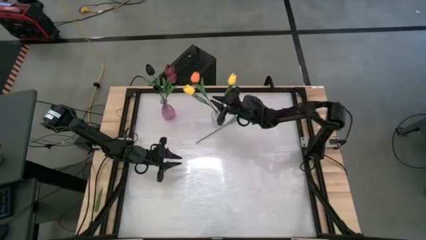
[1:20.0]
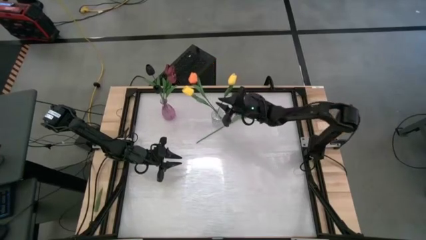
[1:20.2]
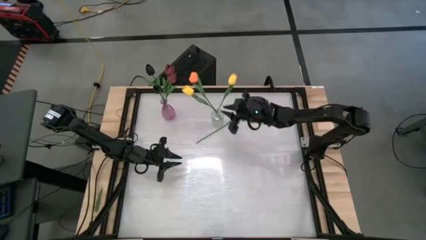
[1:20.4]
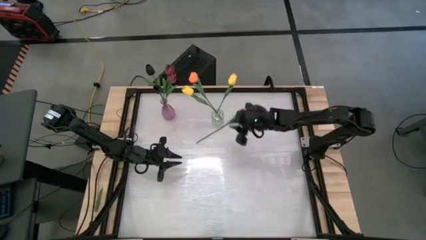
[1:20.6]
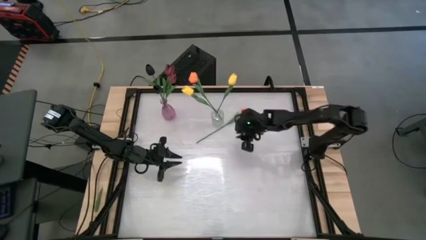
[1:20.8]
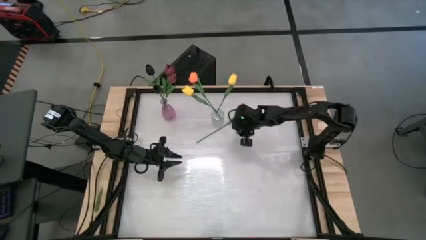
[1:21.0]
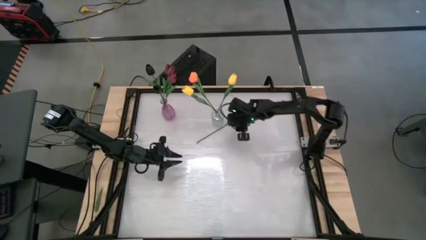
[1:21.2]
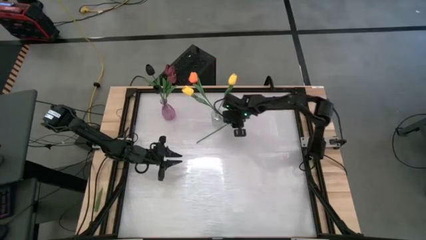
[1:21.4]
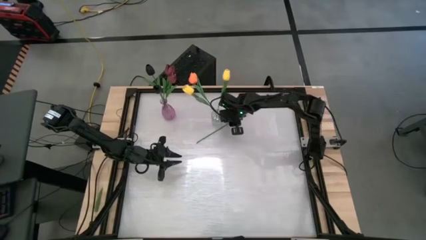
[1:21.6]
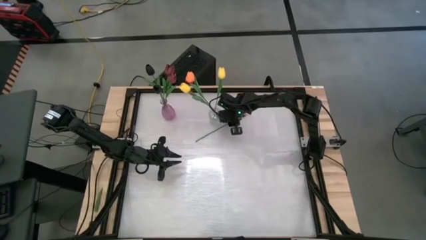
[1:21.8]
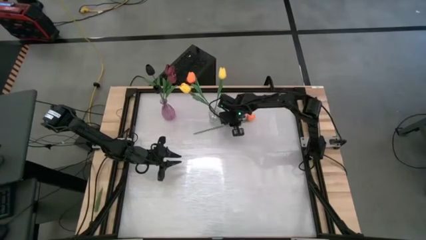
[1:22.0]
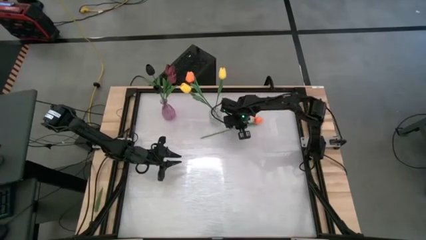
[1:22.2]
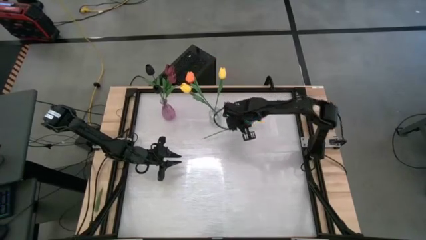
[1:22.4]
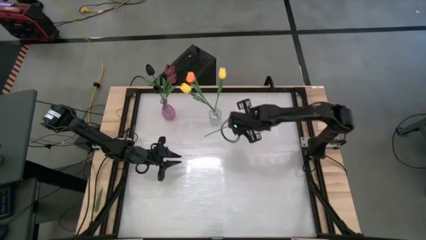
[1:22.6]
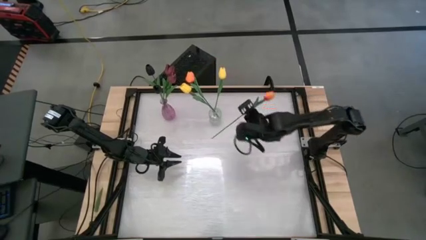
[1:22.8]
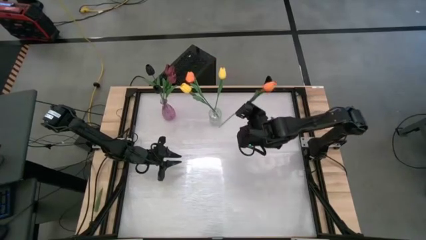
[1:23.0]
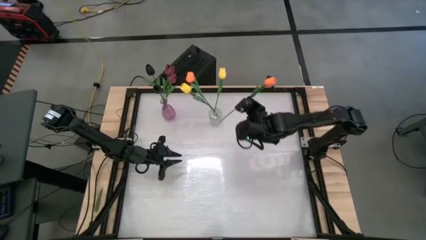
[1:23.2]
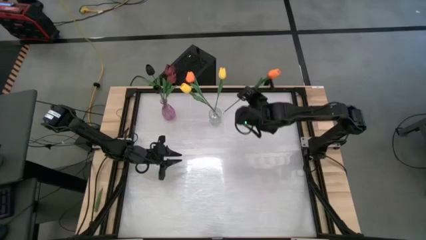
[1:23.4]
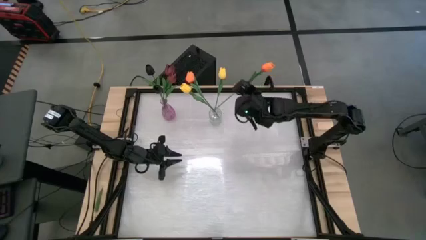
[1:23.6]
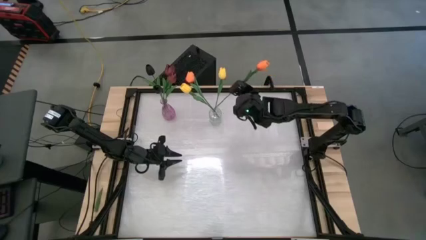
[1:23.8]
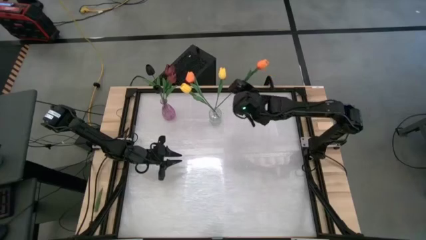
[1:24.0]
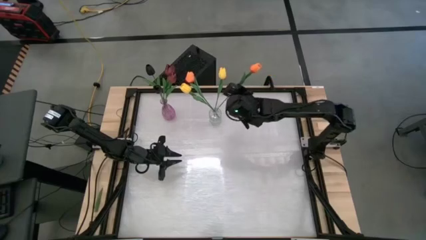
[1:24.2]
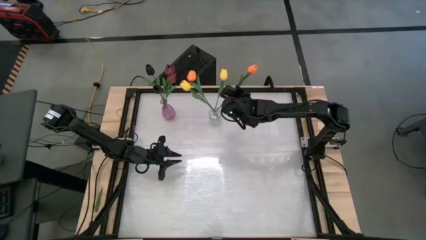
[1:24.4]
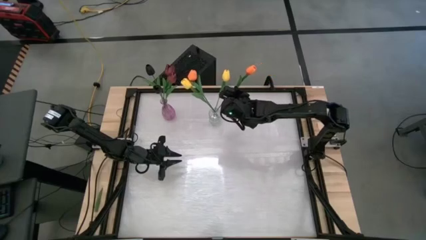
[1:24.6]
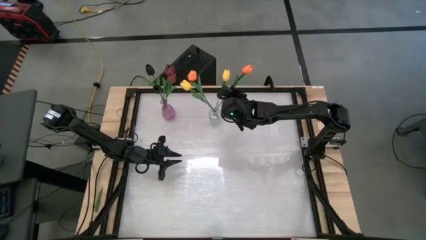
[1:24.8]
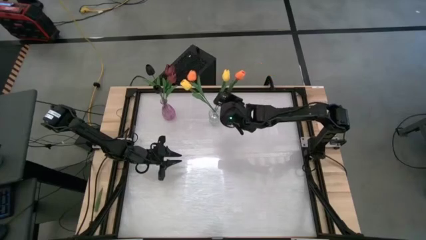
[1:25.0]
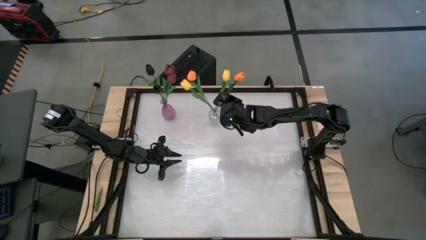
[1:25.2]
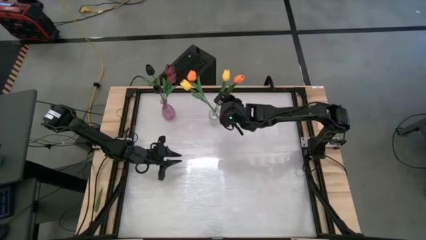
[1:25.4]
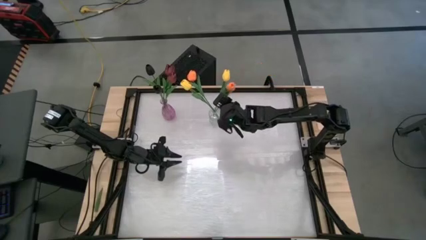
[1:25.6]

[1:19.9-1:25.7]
Task: Sort flowers into vase by color
Put the orange flower into the transparent vase

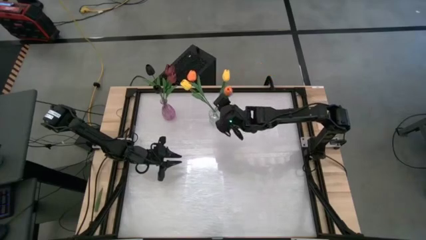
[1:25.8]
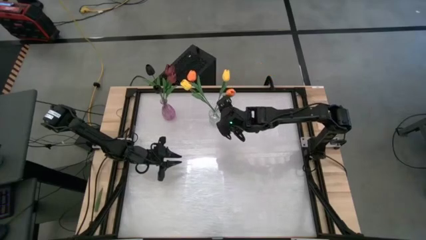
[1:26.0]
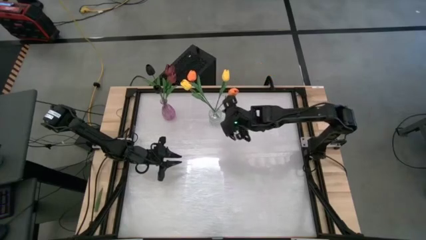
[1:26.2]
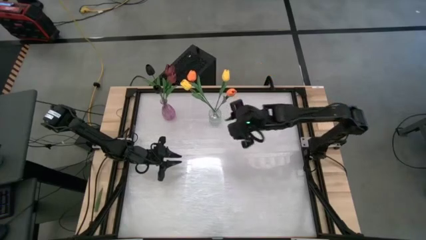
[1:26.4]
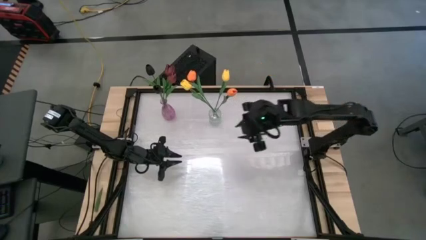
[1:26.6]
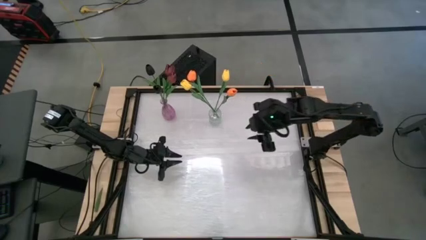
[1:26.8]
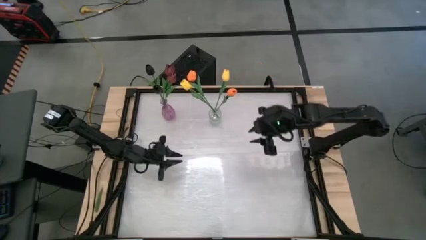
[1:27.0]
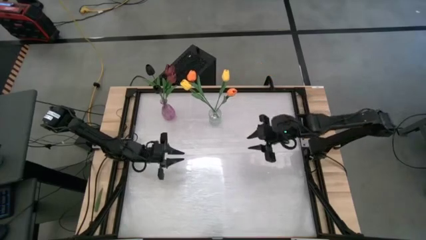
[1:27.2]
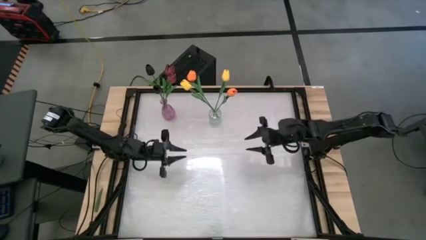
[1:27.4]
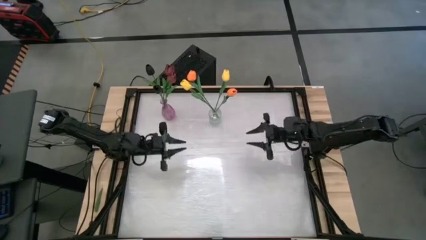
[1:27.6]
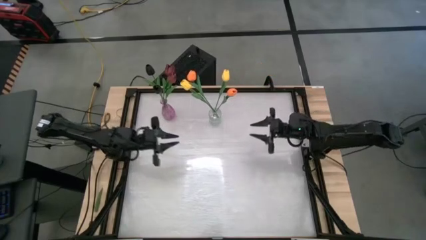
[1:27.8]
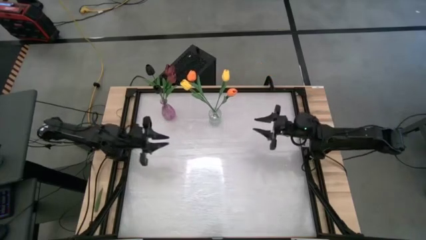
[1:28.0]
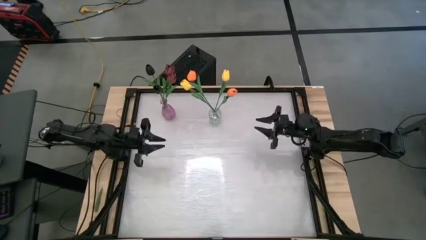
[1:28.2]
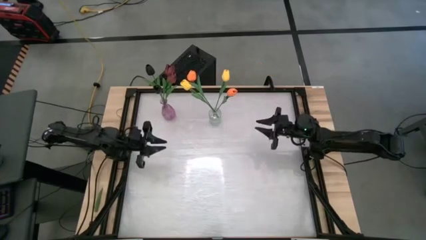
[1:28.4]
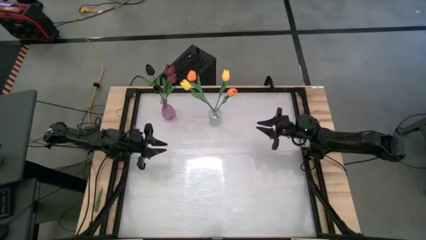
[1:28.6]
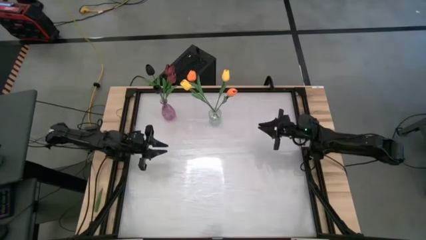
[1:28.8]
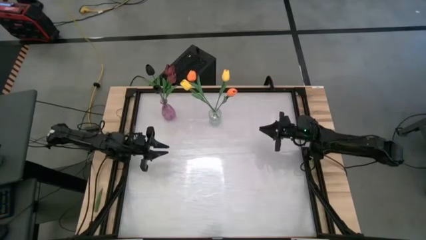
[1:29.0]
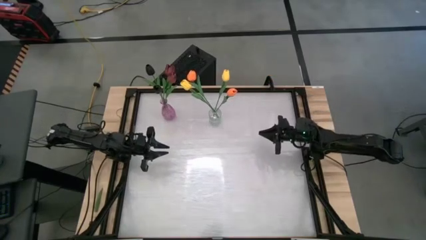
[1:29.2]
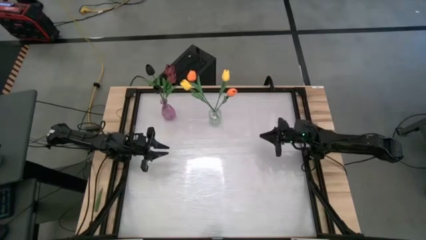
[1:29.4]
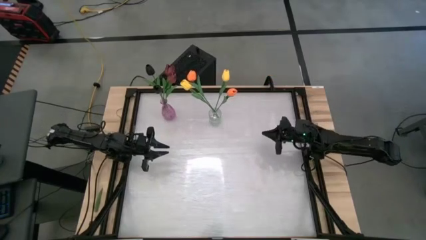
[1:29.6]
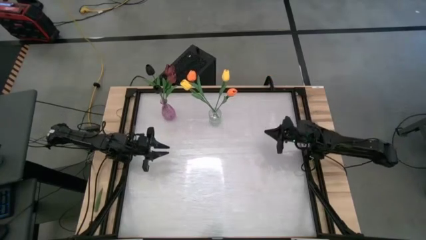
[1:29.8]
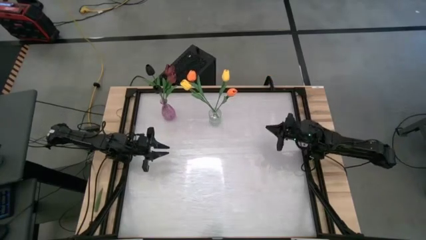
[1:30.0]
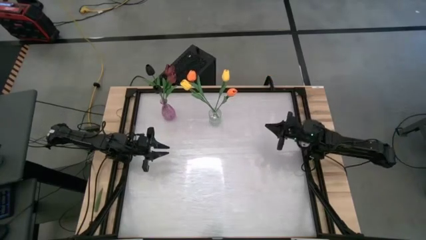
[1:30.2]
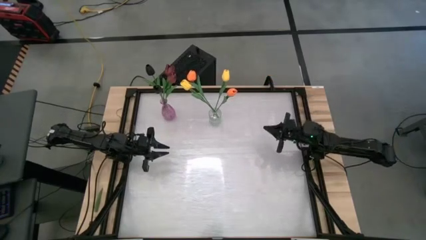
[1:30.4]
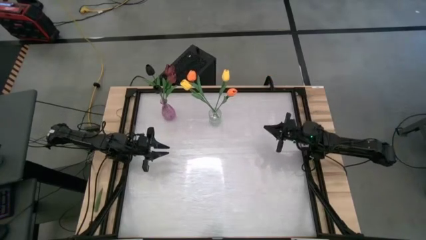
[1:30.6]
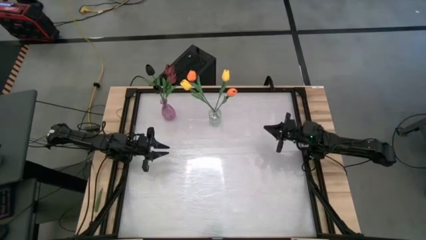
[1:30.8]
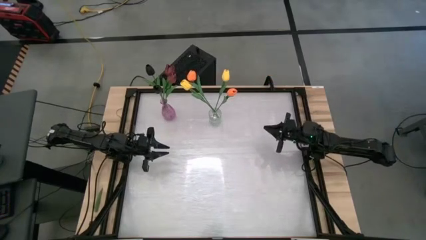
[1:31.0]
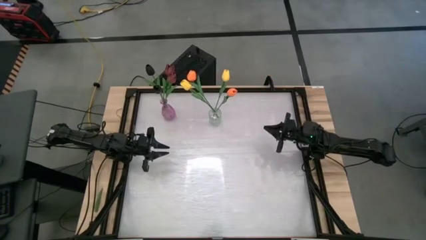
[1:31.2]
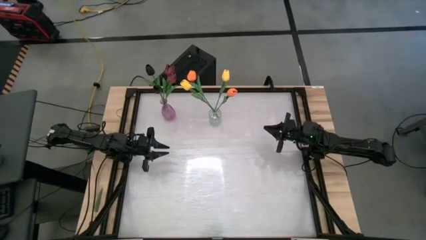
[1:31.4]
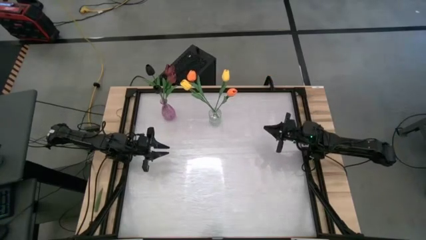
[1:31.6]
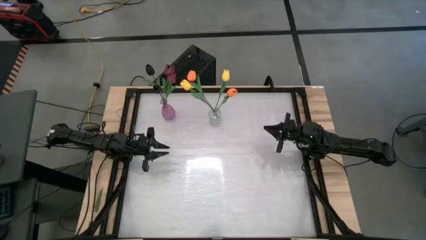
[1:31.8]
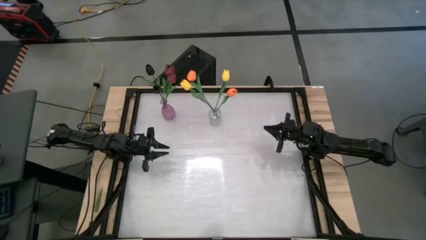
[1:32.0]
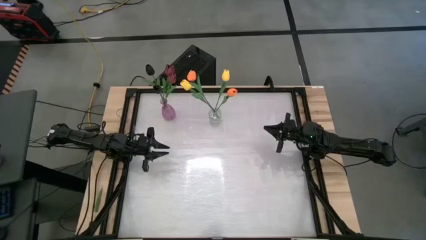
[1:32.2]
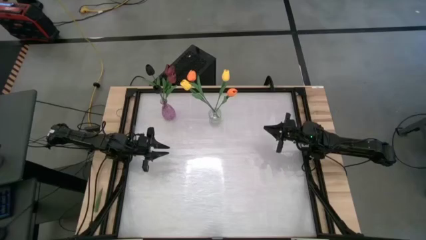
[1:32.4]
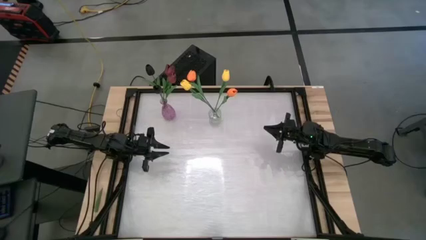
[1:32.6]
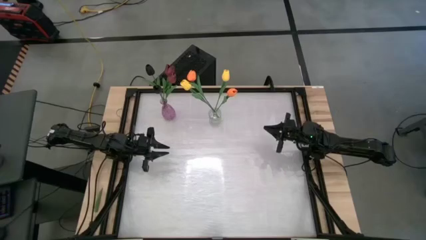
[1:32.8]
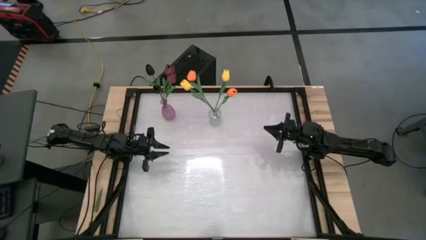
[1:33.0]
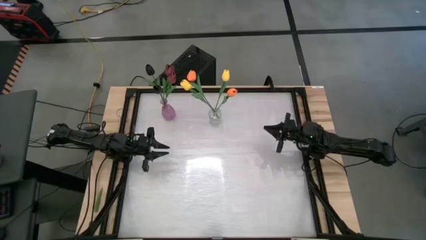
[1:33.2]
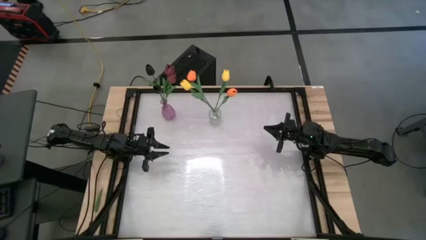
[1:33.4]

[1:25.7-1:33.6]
Return to Home Position

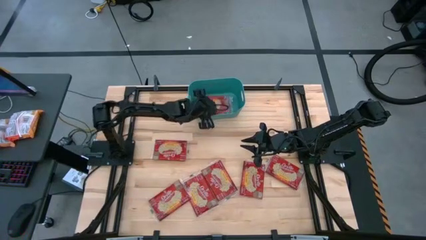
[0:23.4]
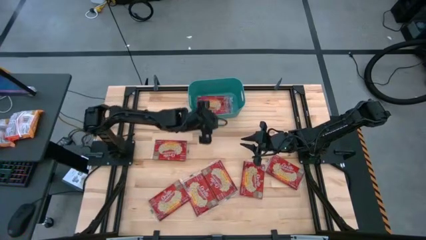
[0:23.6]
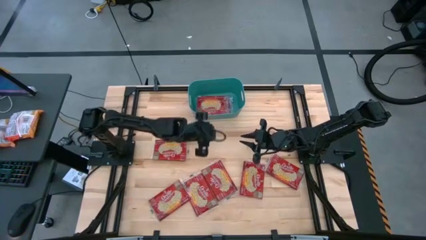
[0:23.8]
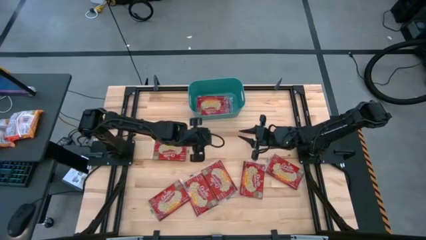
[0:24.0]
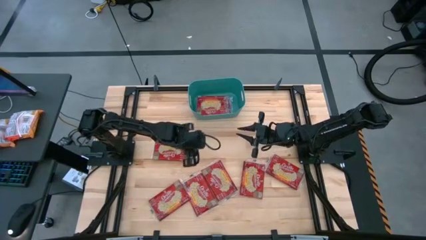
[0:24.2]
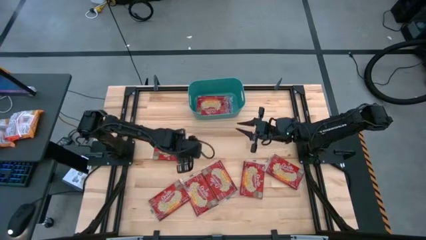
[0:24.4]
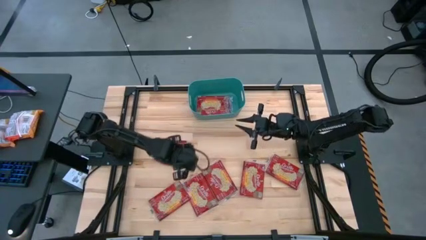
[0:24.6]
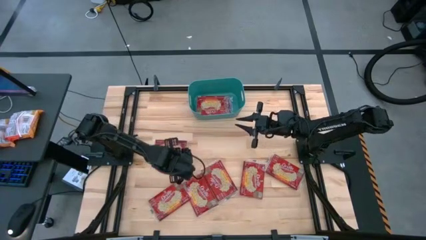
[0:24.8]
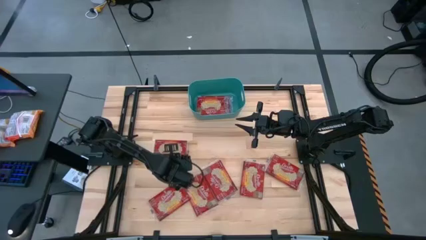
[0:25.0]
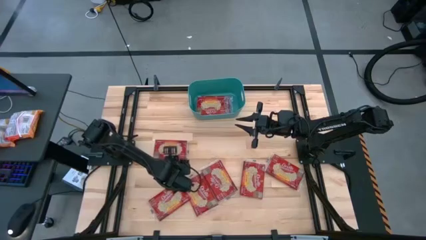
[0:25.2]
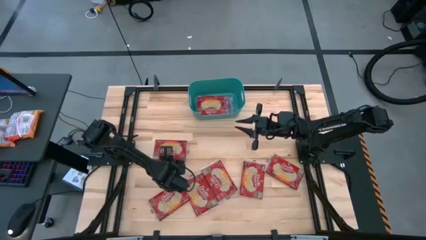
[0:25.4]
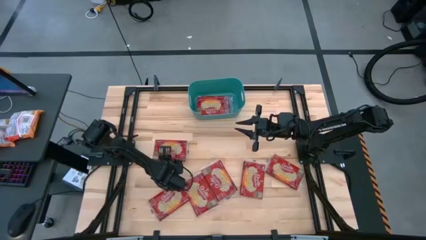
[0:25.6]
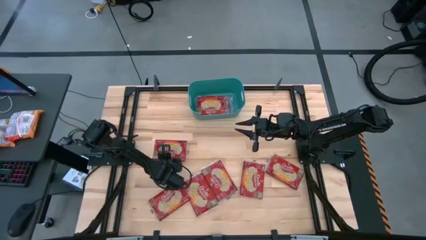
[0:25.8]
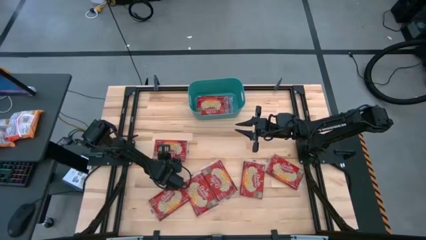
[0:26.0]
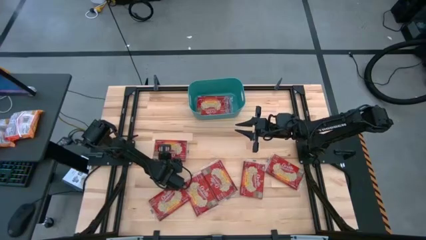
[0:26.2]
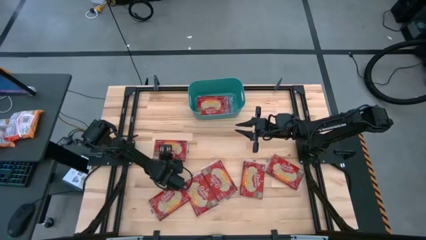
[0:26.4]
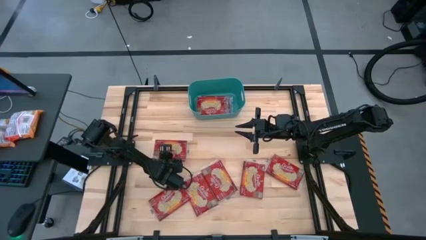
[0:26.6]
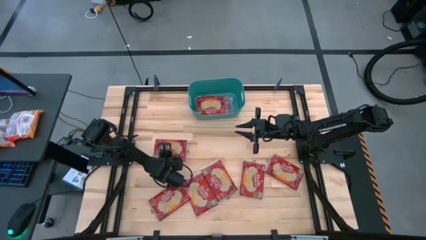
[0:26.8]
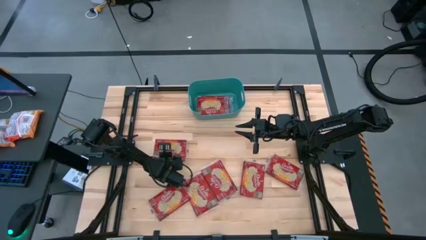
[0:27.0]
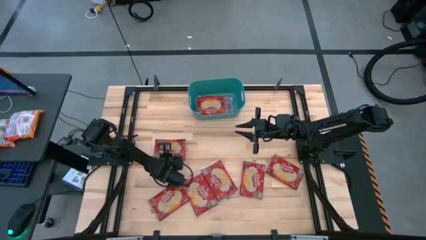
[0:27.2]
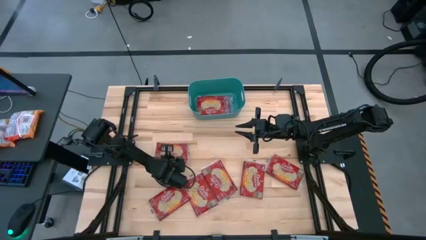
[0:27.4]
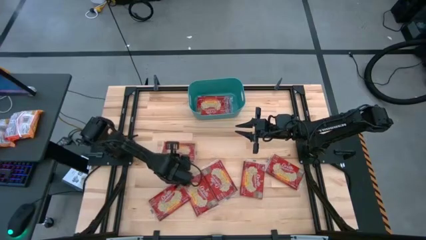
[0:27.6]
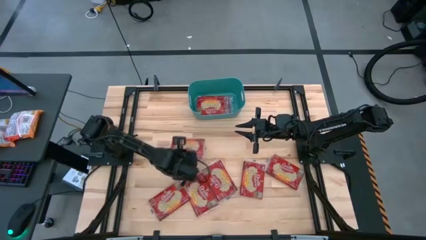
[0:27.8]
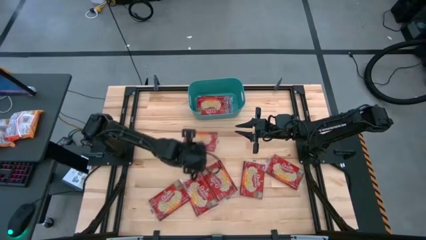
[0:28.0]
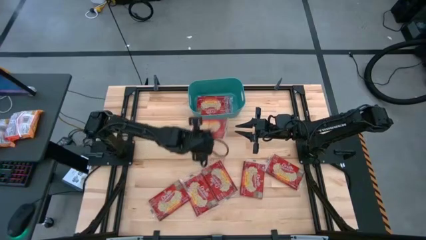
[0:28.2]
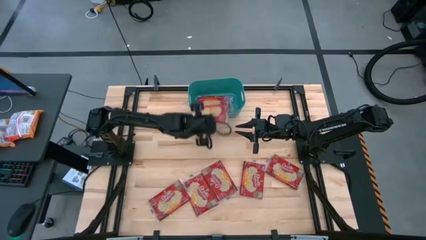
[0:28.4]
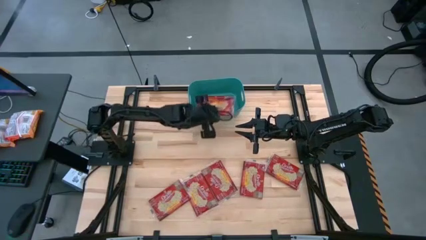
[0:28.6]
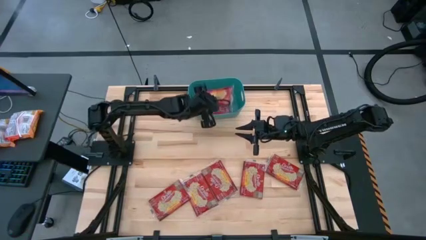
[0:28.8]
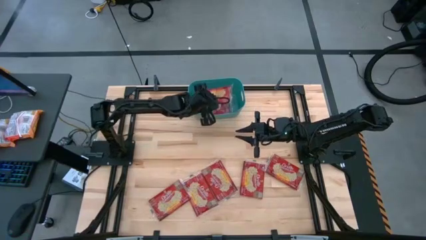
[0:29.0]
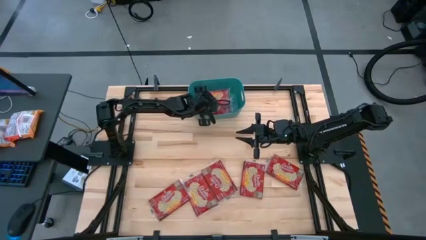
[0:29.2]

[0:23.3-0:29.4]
Task: Sort popcorn bags into baskets
Put the red popcorn bag into the bin
